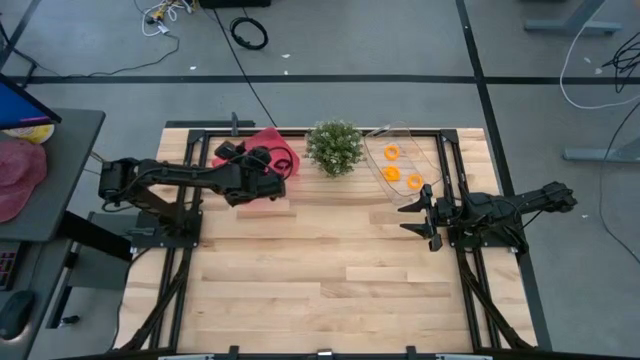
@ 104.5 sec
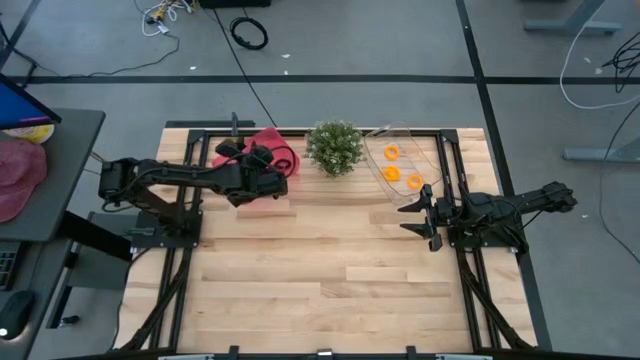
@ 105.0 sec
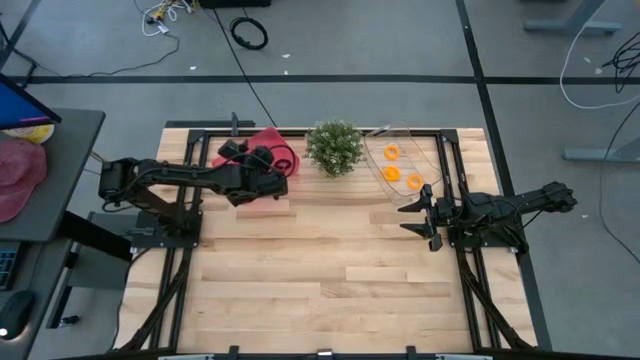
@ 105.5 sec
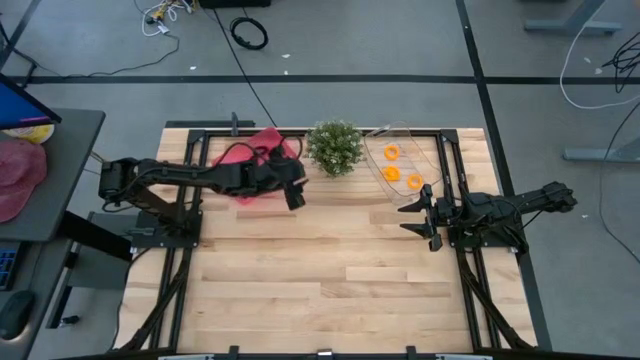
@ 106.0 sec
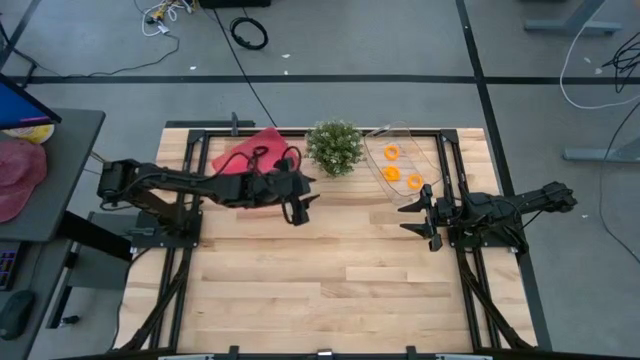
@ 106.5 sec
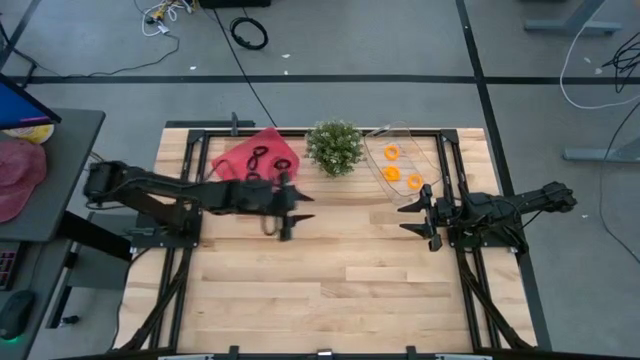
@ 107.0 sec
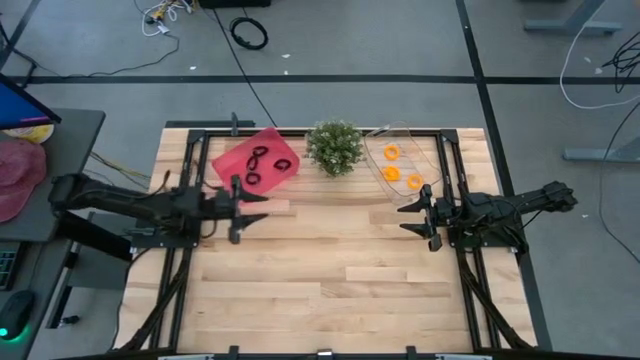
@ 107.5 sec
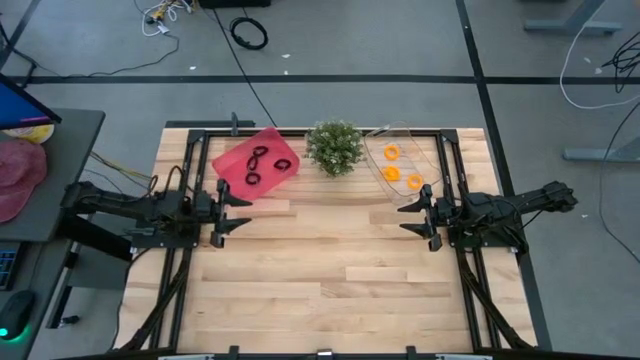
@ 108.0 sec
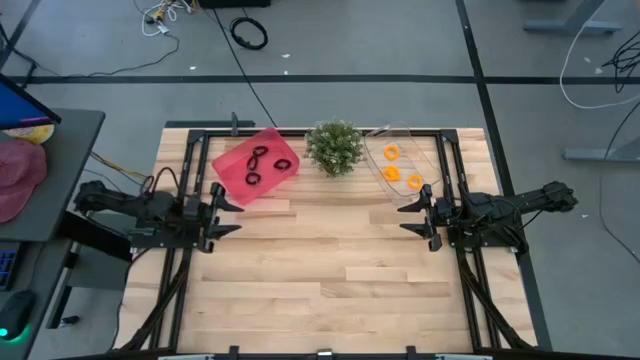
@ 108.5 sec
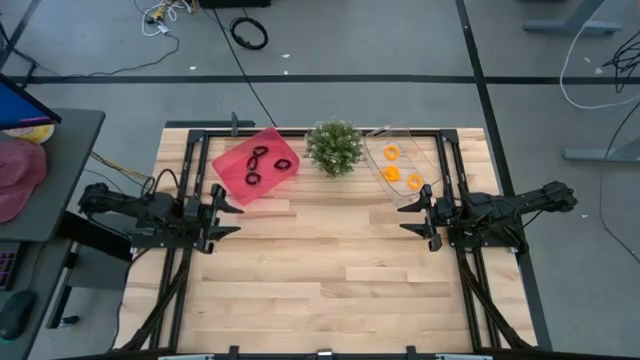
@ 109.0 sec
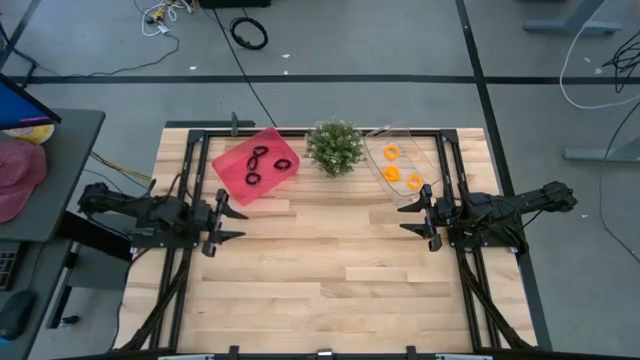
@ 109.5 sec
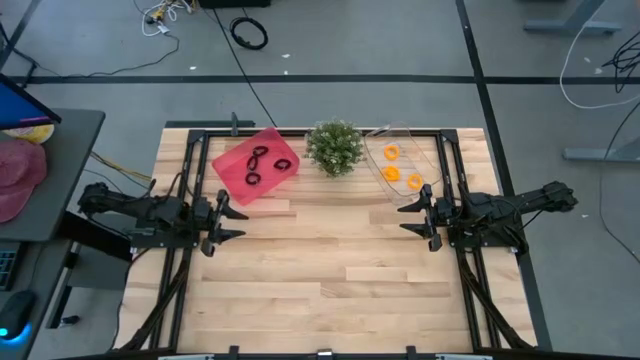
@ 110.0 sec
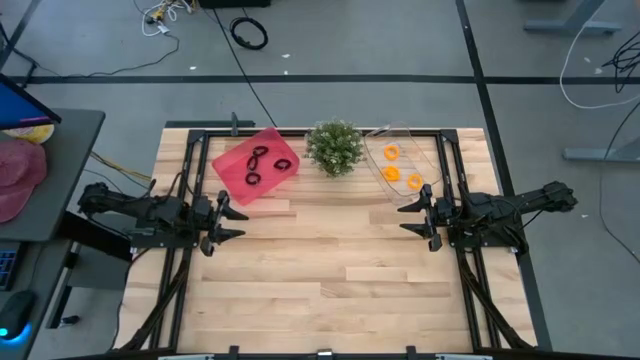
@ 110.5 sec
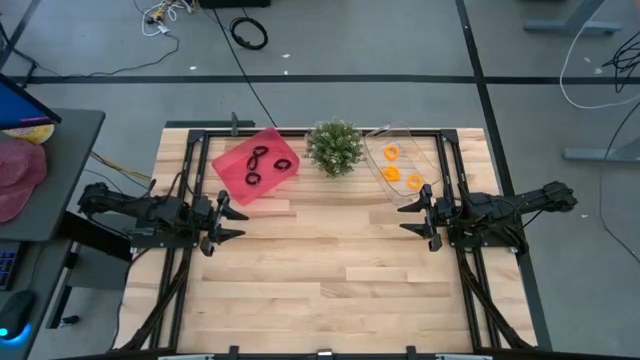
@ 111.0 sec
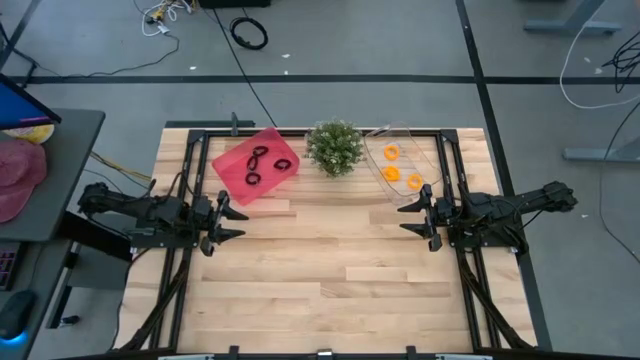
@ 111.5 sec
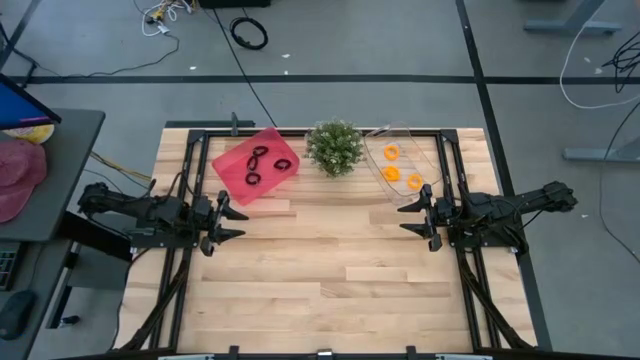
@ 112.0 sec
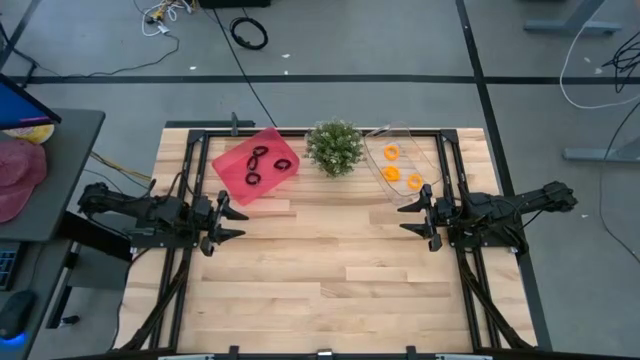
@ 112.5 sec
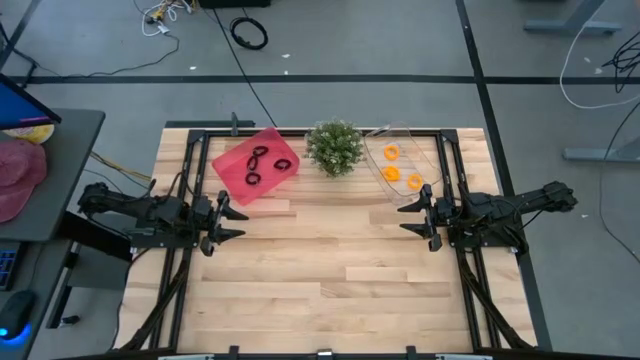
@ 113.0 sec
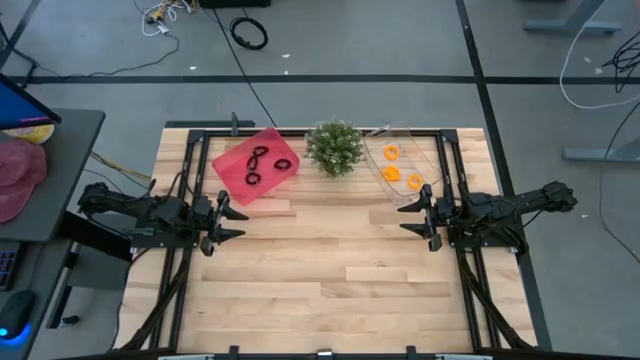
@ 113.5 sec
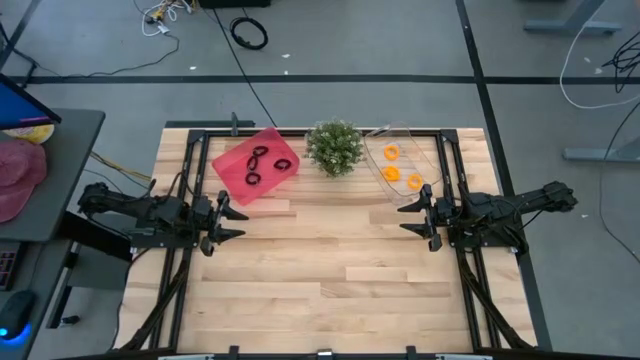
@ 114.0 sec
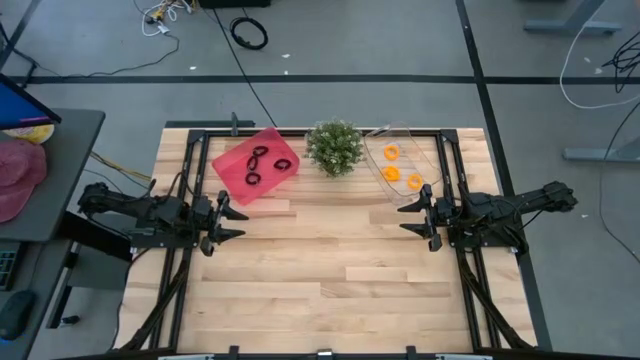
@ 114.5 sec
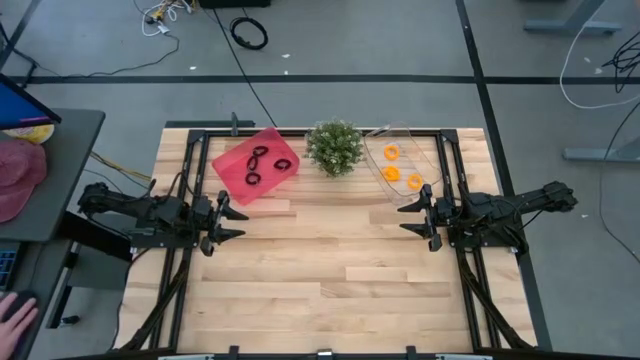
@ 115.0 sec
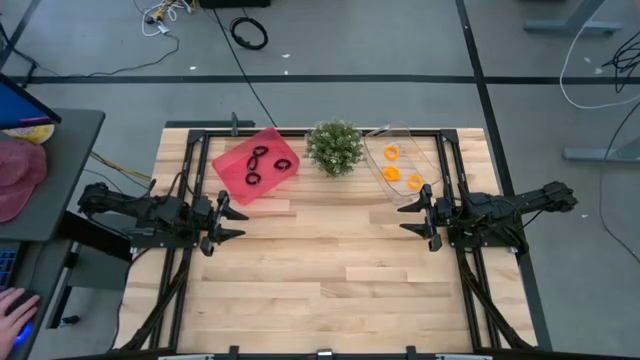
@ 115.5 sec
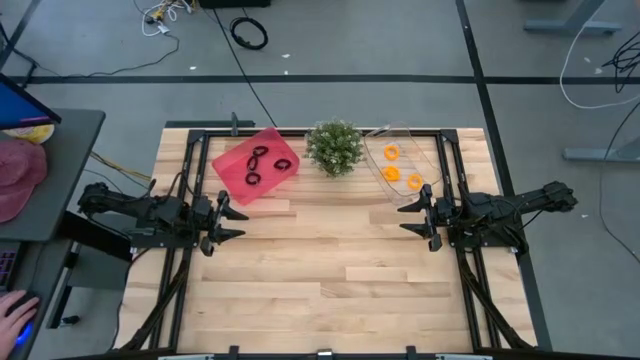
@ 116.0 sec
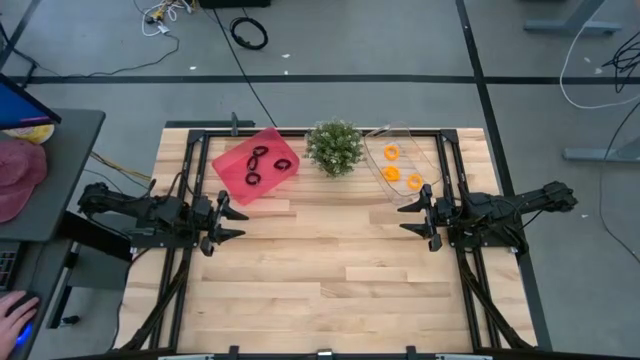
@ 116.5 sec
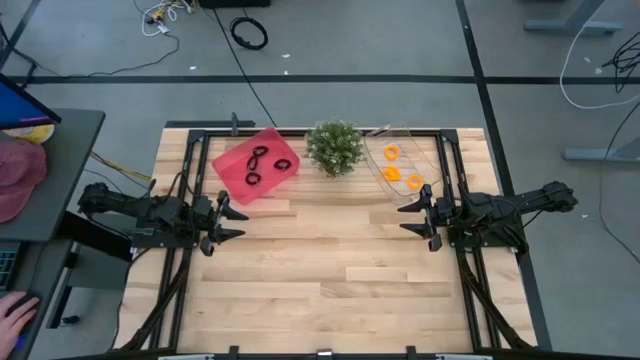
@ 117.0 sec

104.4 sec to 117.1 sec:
Task: Sort spring keychains
Return to Home Position

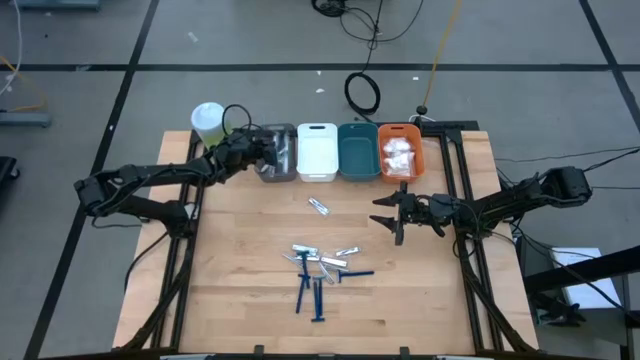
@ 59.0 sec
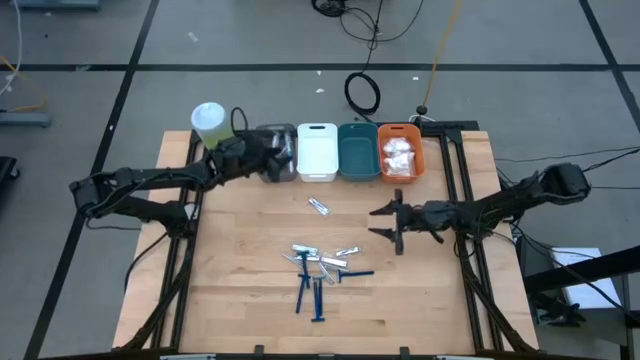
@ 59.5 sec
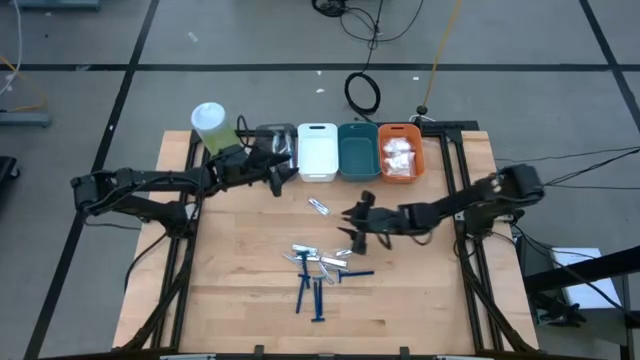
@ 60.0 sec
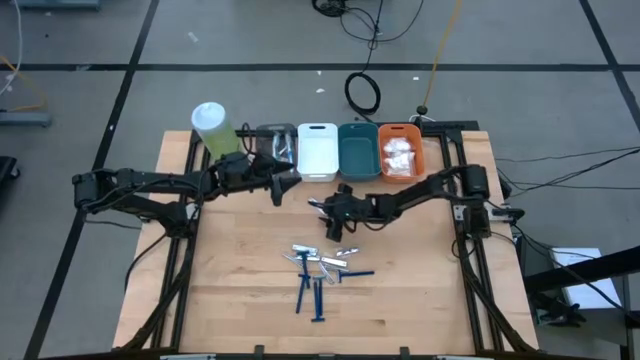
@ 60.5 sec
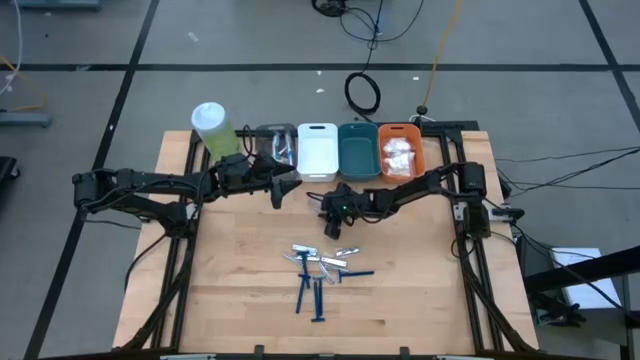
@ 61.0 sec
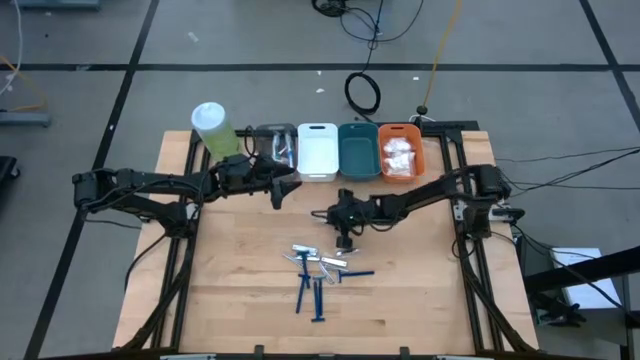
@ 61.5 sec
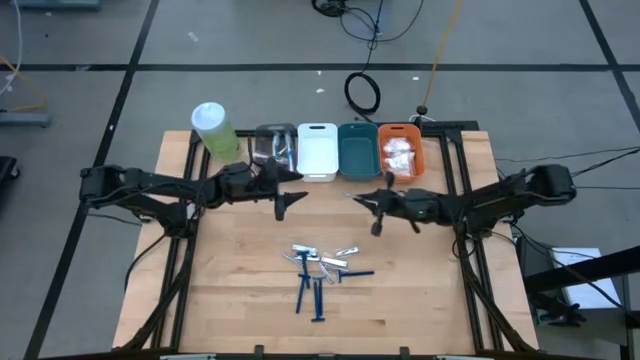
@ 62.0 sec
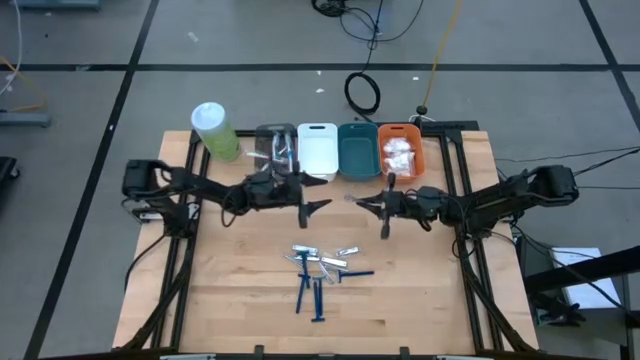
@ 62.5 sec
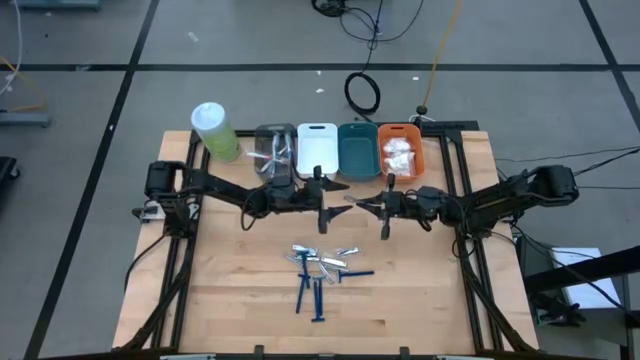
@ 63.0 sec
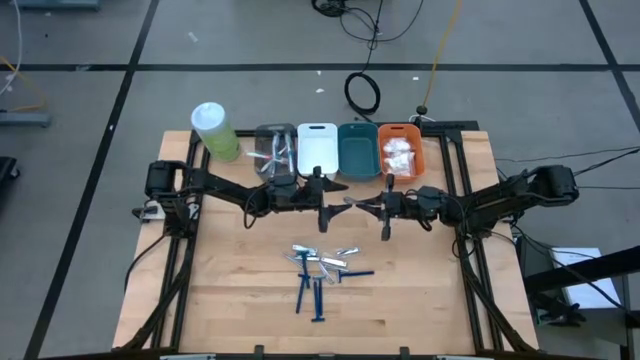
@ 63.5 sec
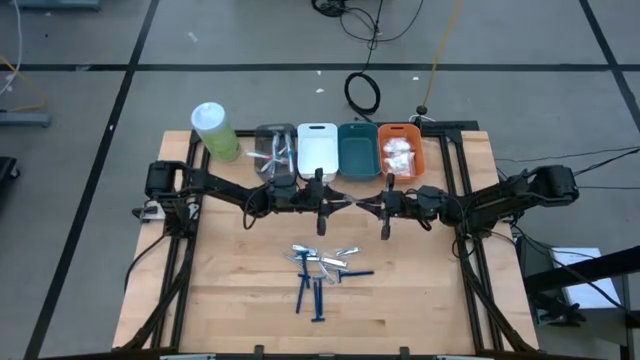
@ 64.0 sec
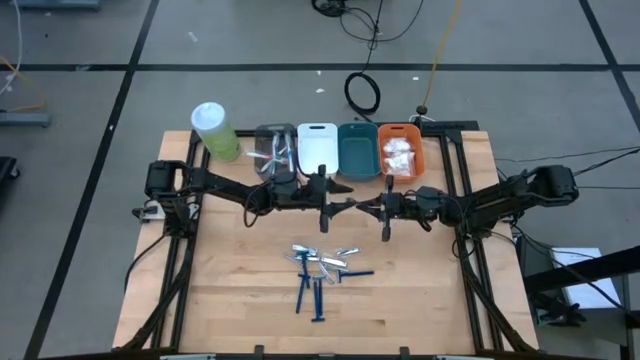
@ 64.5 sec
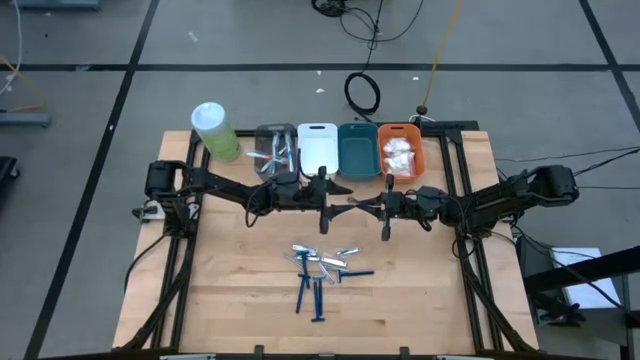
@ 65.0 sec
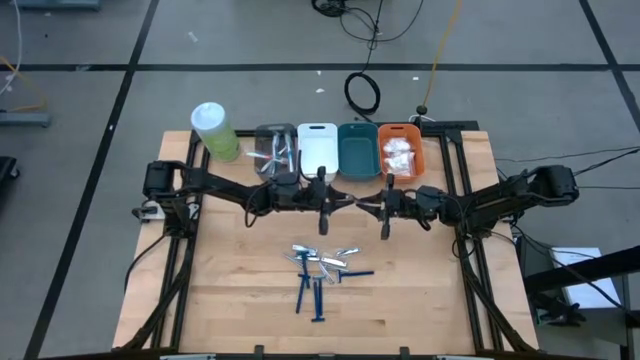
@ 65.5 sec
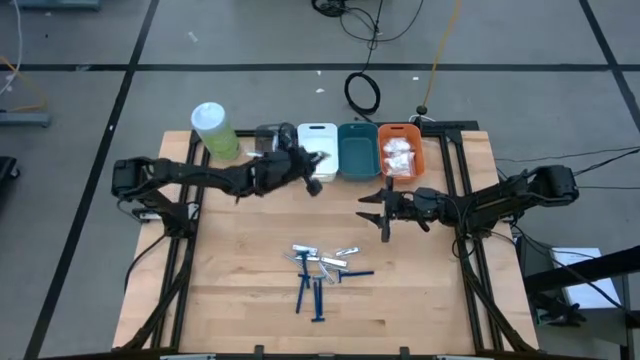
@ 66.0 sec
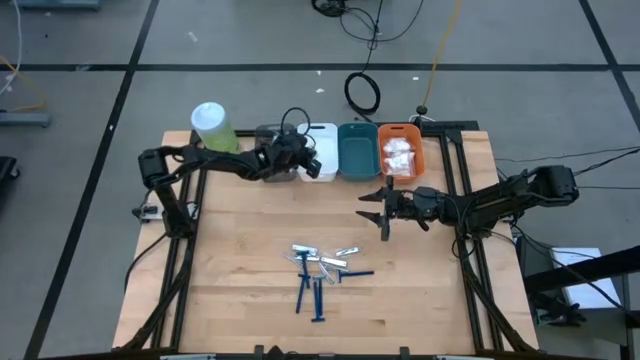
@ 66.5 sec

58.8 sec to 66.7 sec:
Task: Pick & Place Travel size toiletries
Put the silver nail cutter into the white bin

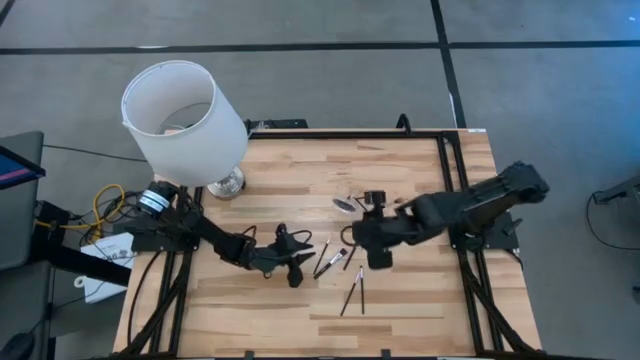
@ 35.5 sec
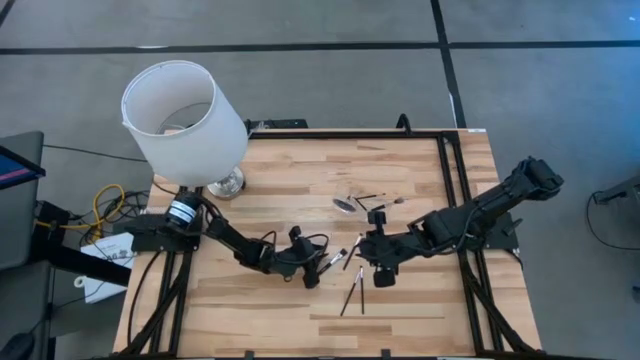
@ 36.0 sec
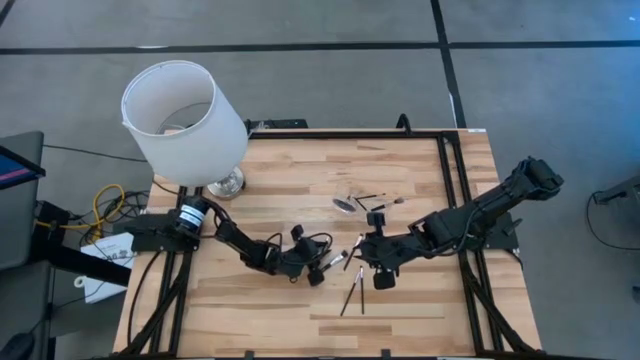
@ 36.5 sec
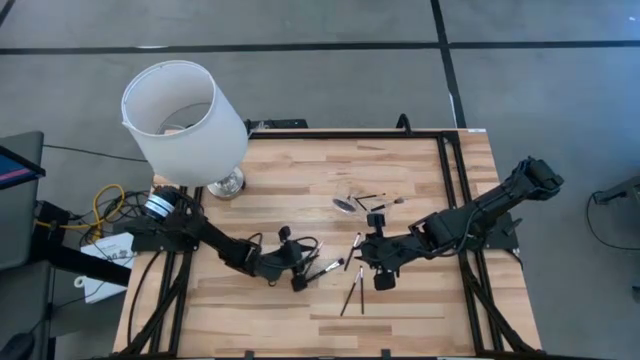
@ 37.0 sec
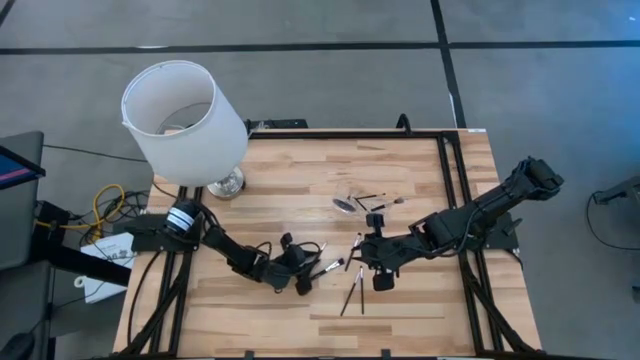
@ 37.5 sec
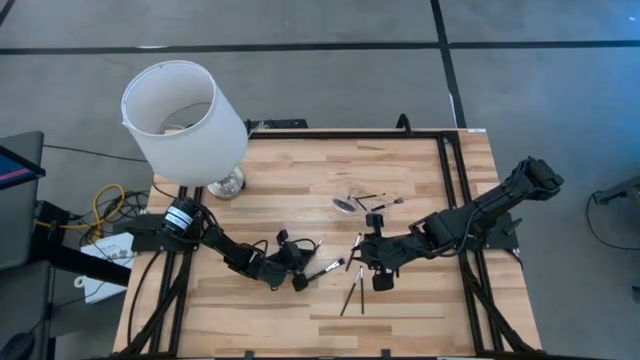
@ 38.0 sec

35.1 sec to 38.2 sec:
Task: Put items in baskets/containers
Put the black liner brush into the transparent organizer
